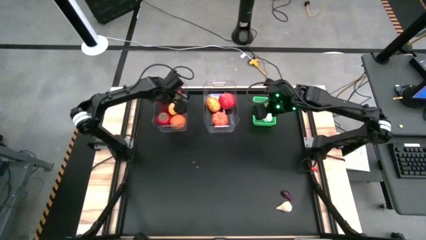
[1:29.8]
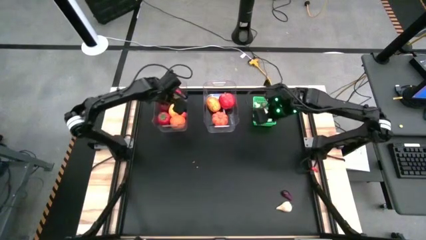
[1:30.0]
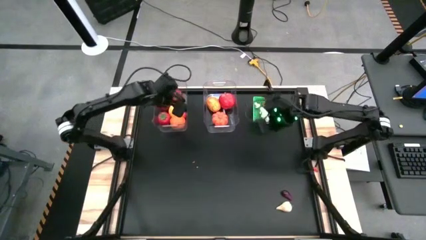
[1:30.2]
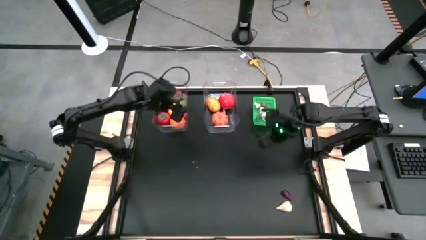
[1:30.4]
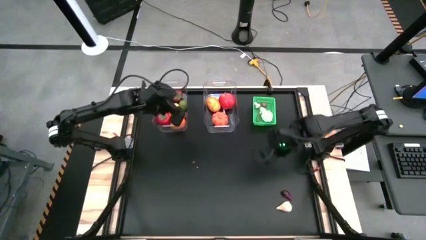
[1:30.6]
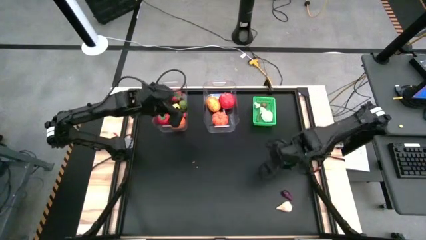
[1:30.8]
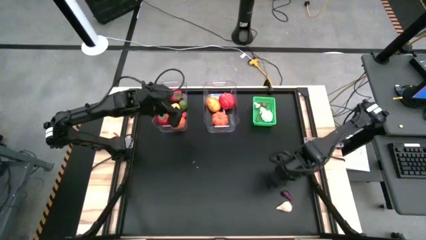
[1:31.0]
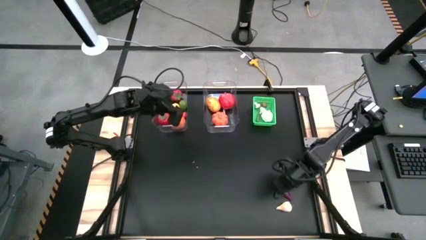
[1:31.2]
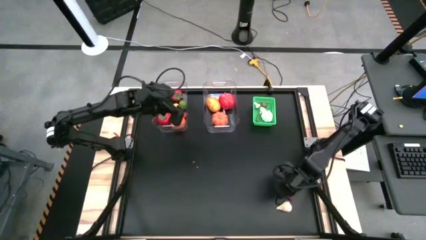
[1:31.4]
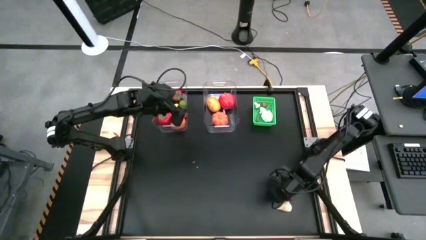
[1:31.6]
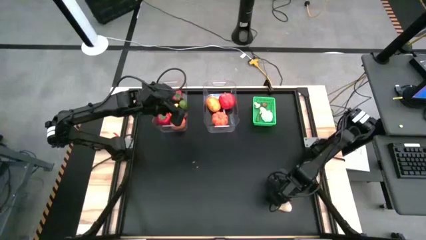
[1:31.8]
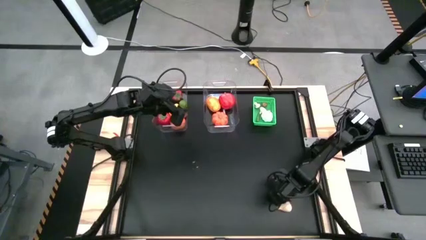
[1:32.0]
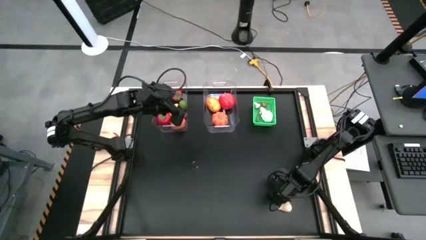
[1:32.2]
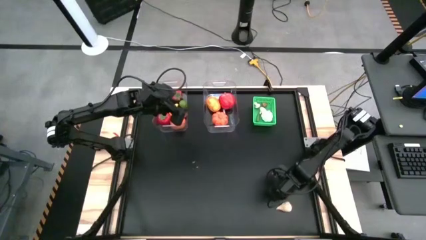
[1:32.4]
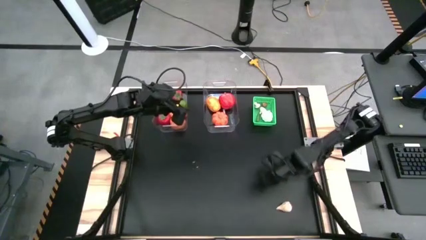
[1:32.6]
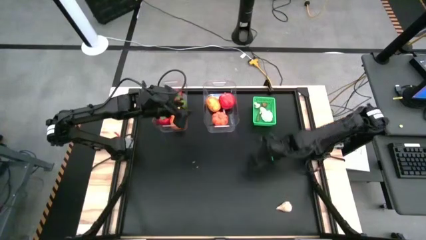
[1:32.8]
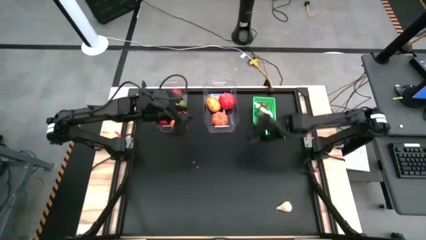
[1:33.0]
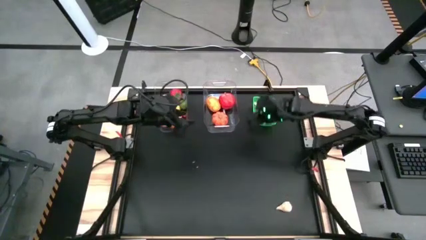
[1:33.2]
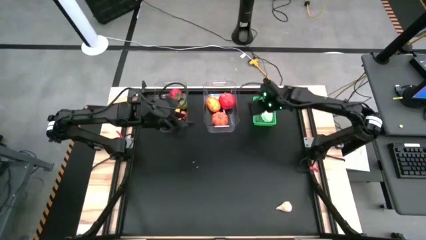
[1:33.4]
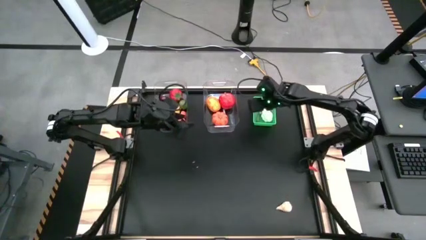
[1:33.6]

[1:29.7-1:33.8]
Task: Sort produce into baskets
Put the eggplant into the green bin

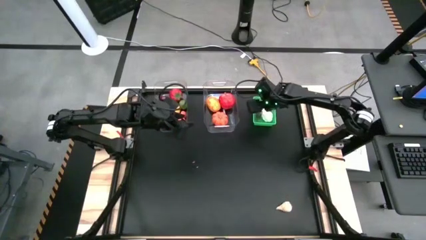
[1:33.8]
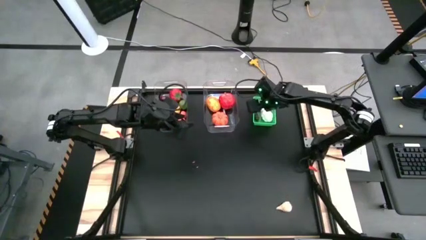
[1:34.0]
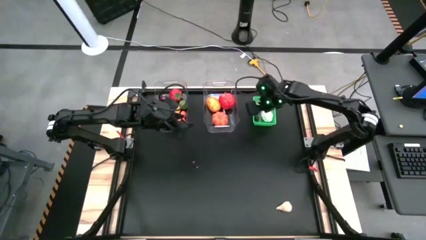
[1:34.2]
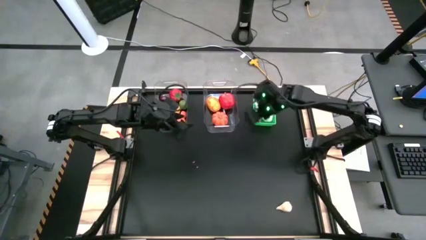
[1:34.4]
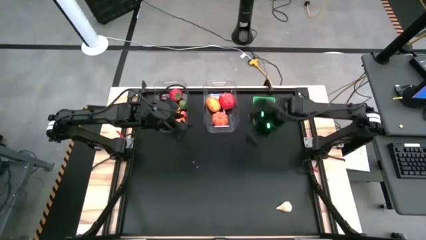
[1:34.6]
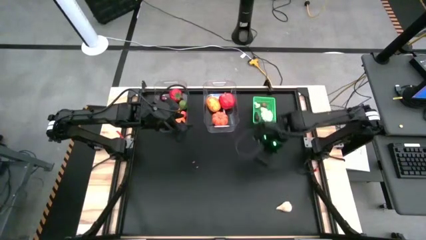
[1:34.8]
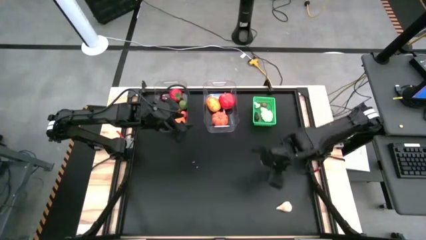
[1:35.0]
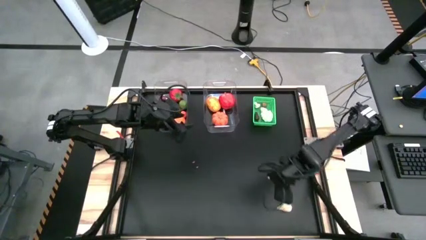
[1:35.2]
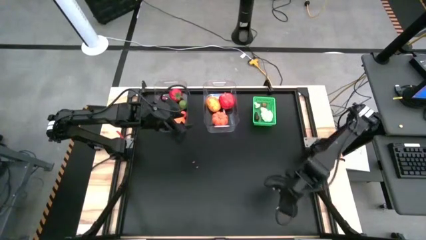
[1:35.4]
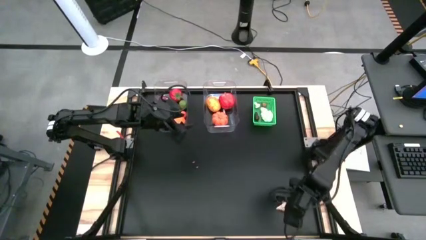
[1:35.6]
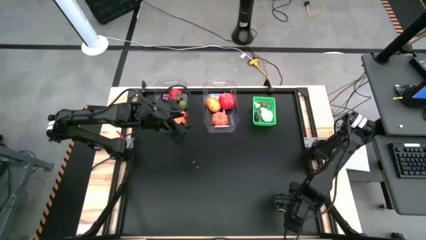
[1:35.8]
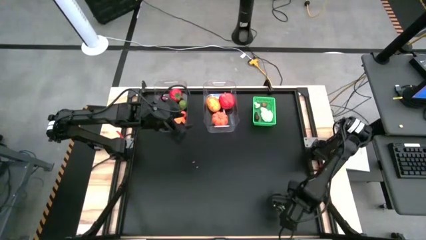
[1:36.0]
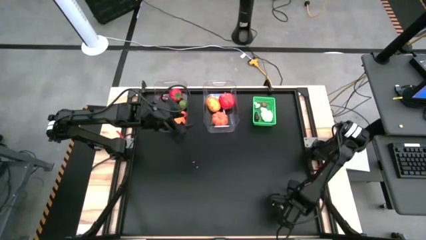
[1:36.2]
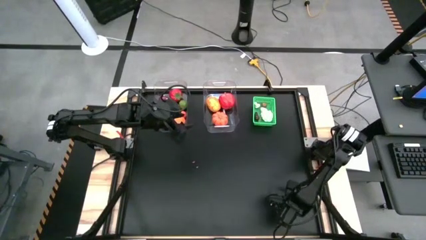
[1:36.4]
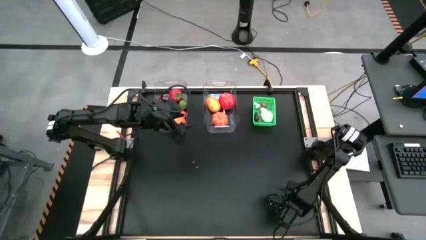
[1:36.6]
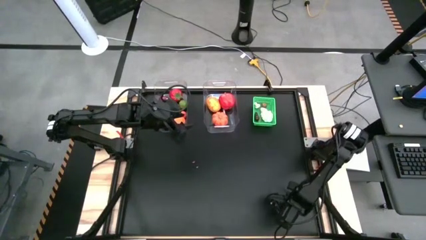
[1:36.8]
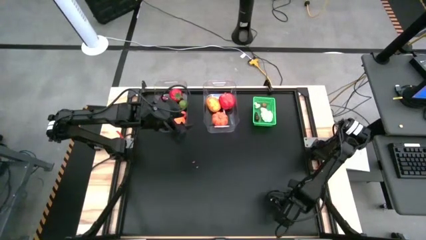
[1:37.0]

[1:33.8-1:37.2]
Put the garlic into the green bin

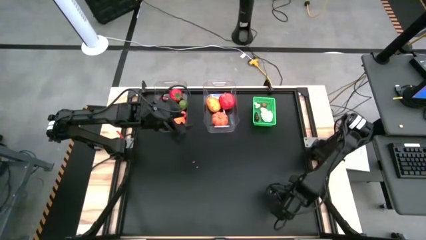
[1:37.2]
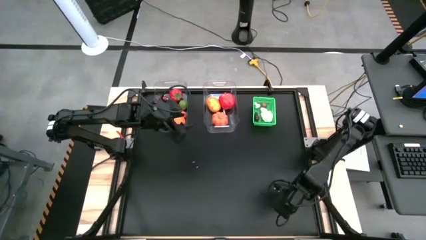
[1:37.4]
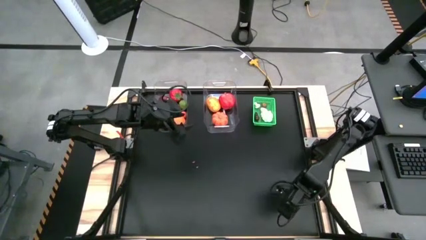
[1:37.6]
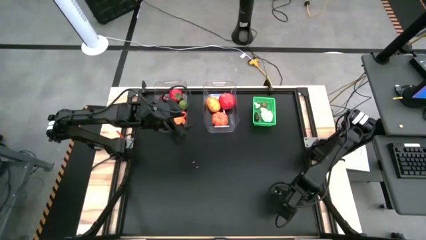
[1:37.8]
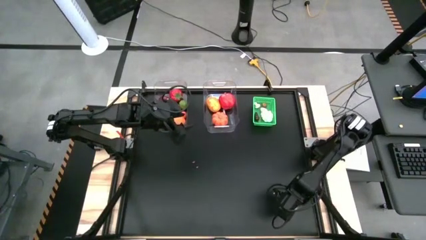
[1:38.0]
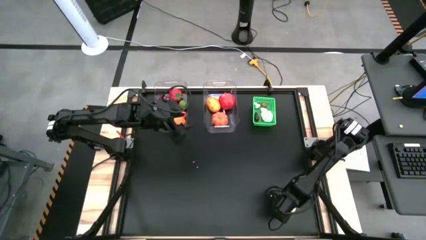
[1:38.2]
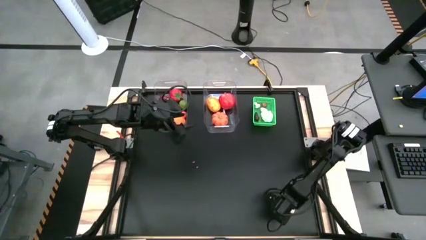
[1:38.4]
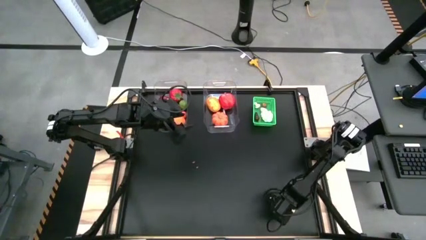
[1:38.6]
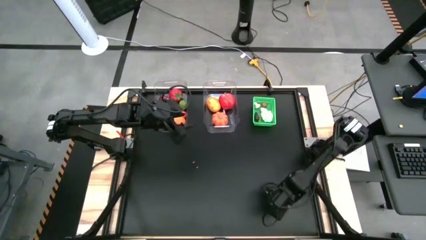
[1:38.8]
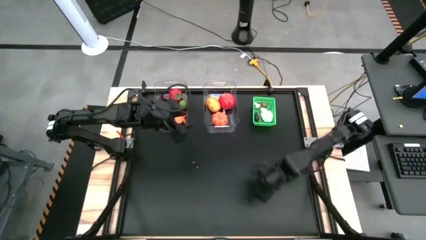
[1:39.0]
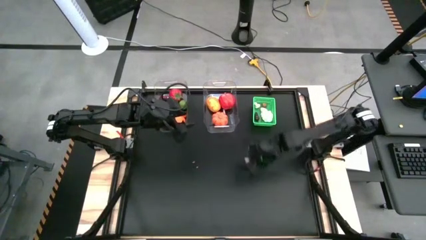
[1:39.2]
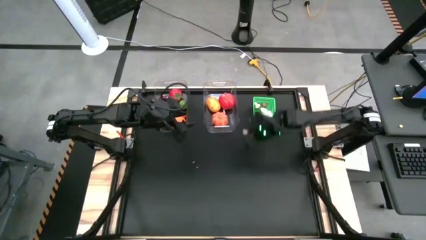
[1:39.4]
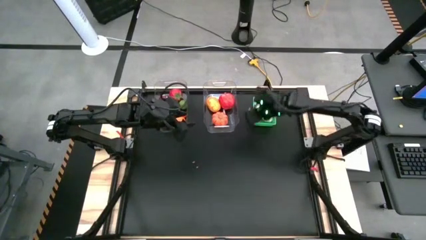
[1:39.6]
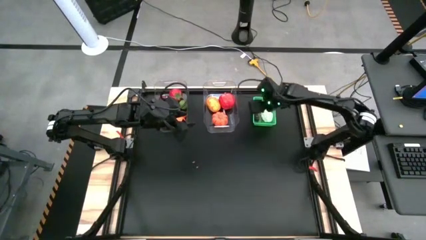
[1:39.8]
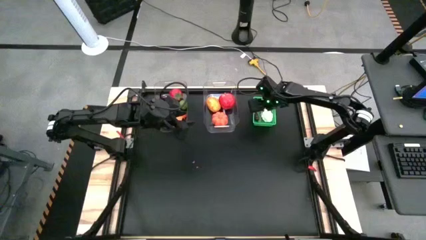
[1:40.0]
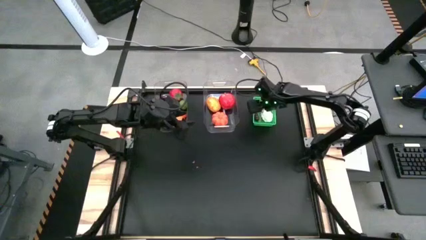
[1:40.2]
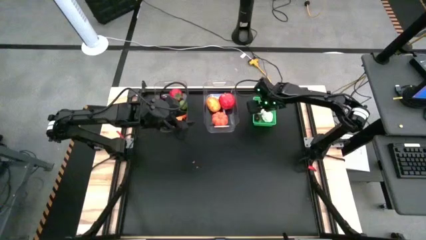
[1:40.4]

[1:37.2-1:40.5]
Put the white garlic into the green bin

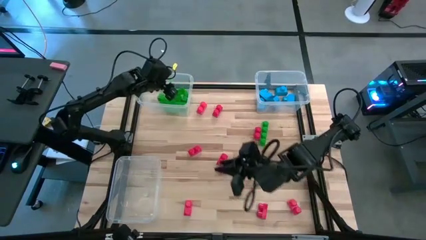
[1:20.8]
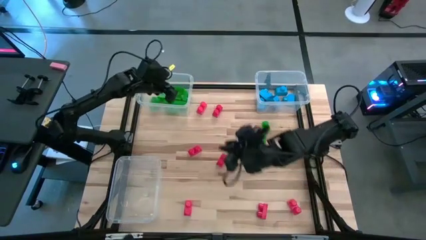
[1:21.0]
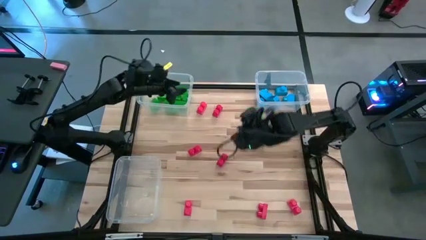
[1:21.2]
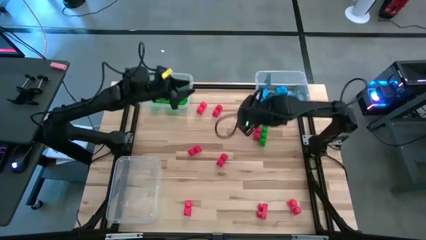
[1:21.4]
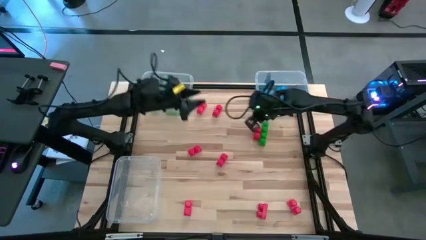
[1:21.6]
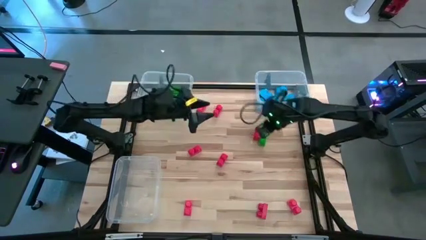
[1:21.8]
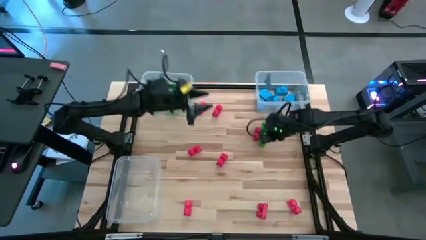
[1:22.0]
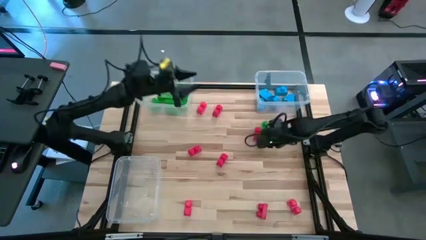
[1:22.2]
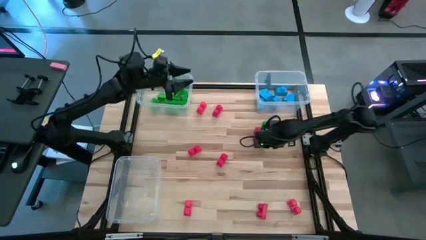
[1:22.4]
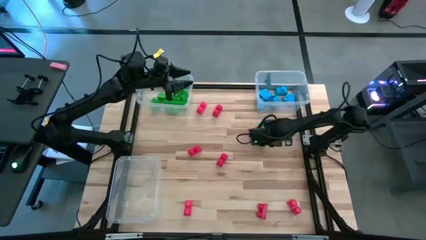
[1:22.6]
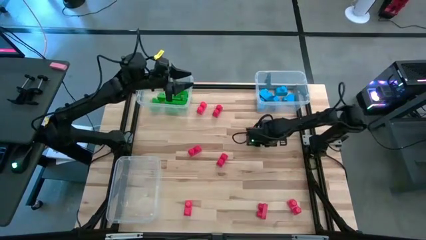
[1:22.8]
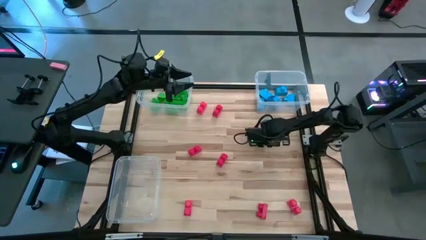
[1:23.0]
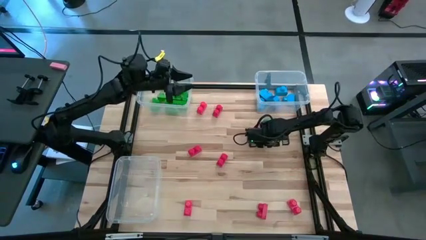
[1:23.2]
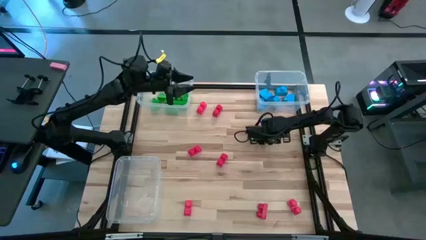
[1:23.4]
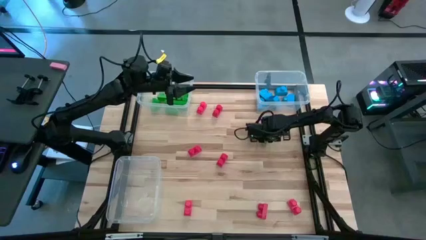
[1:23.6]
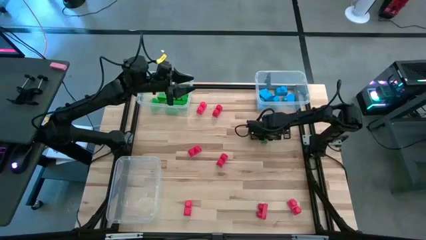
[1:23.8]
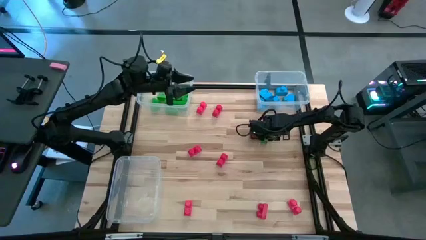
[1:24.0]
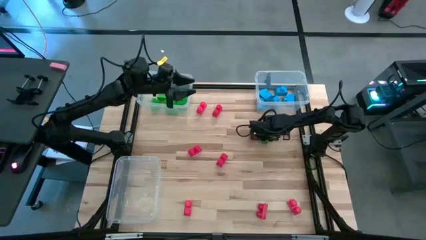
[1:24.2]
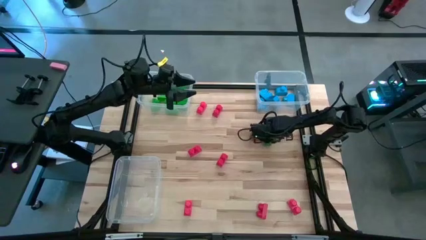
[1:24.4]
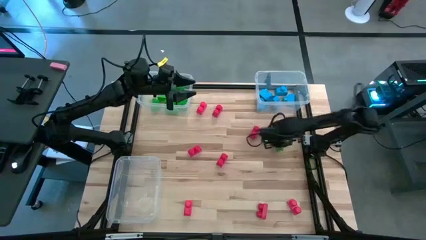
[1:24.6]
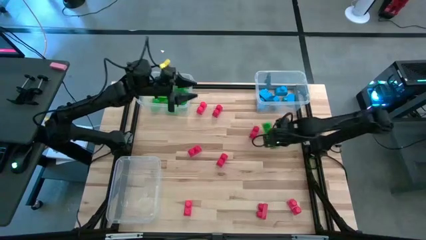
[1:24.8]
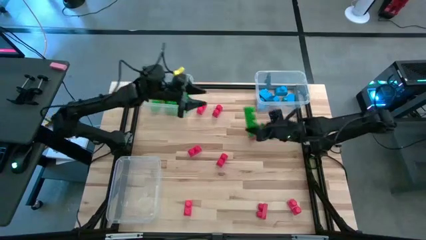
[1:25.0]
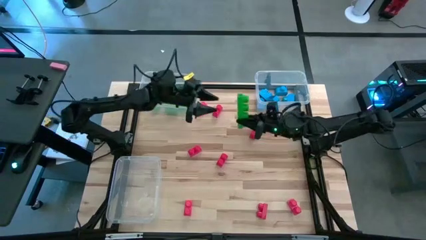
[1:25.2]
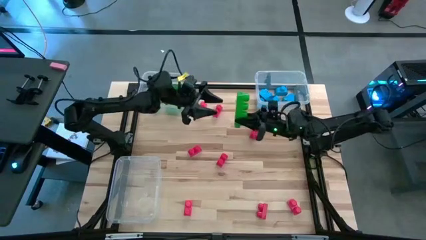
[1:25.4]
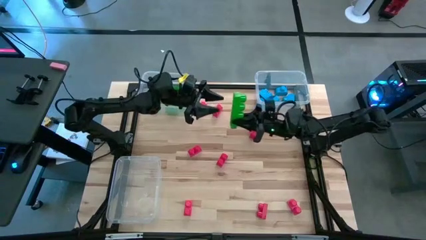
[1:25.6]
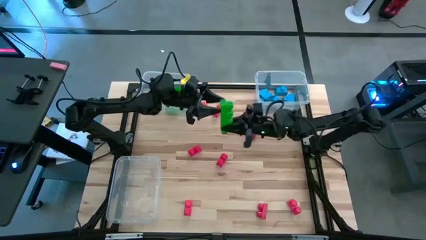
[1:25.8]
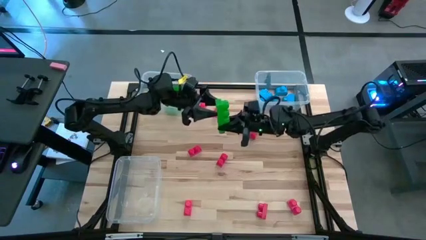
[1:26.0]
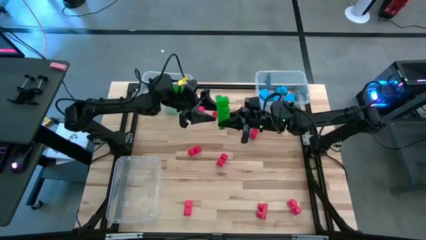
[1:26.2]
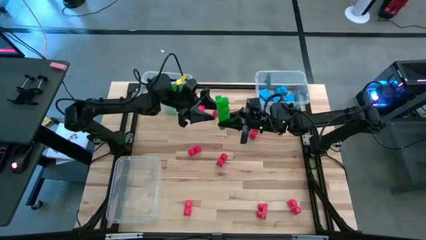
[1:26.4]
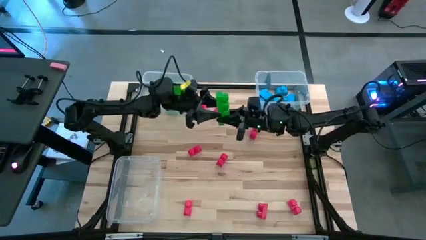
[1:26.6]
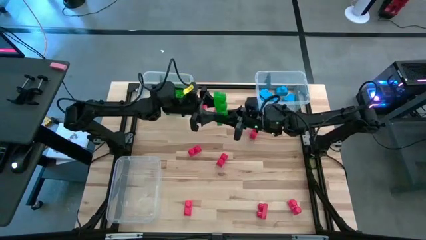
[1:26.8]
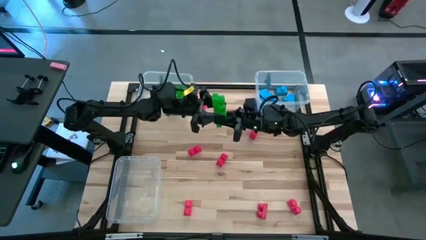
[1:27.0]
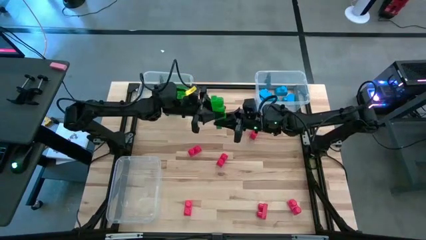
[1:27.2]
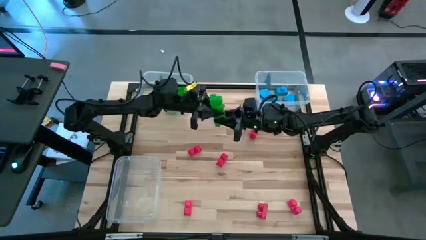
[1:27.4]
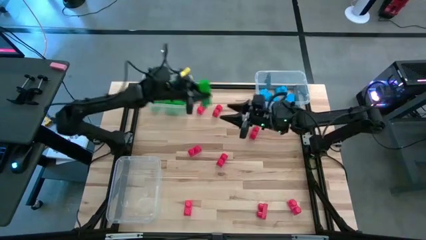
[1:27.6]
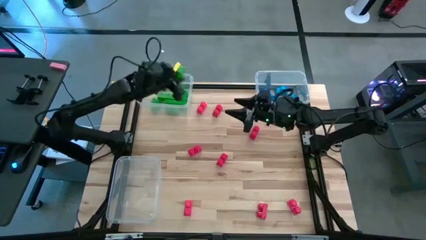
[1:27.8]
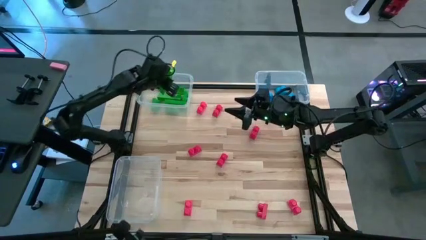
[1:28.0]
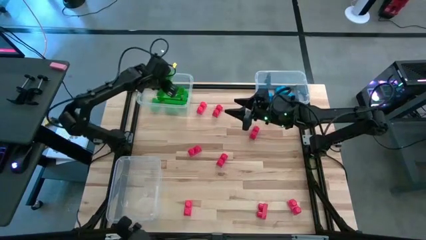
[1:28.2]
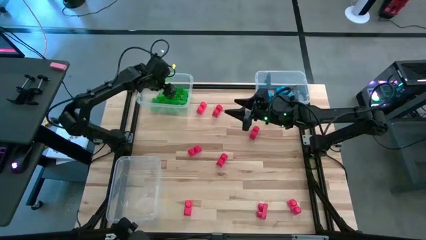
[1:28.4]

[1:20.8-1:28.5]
Task: Sort blocks
Put the green game piece into the top left transparent bin
